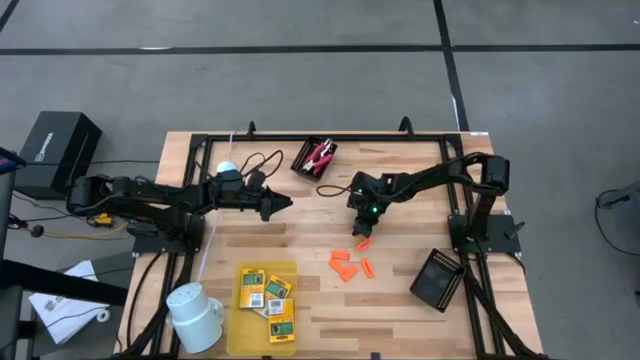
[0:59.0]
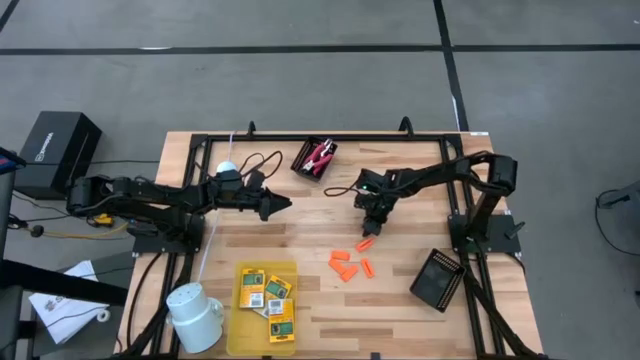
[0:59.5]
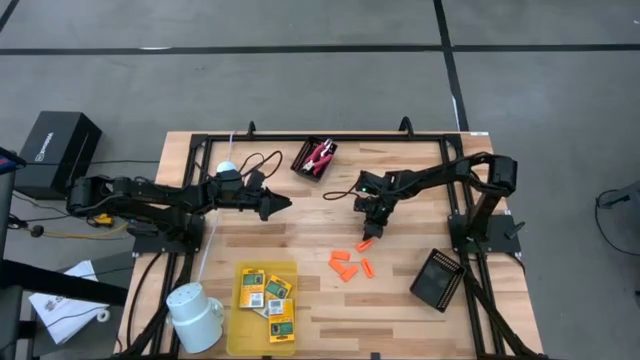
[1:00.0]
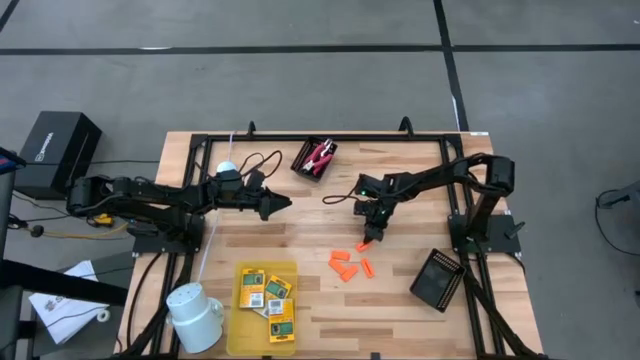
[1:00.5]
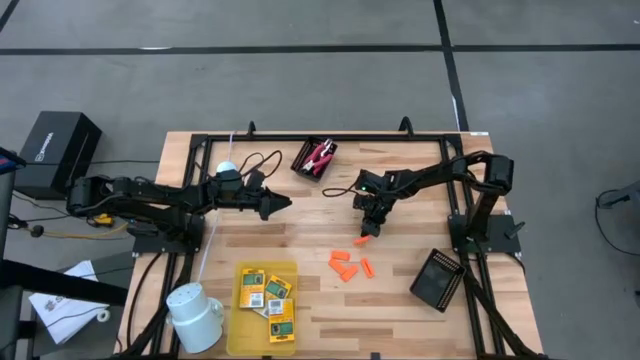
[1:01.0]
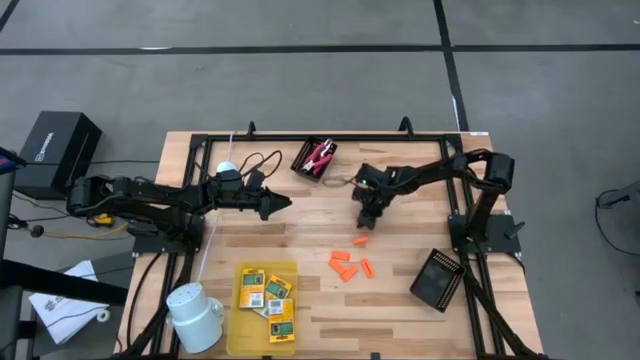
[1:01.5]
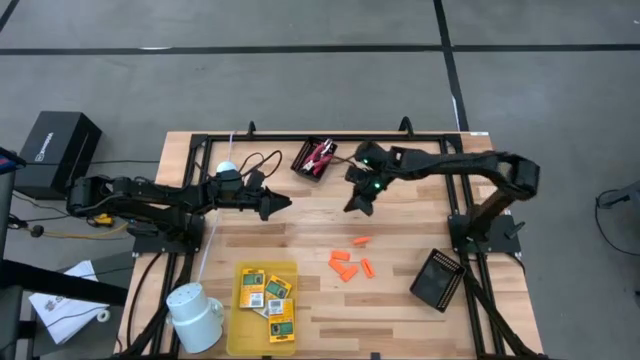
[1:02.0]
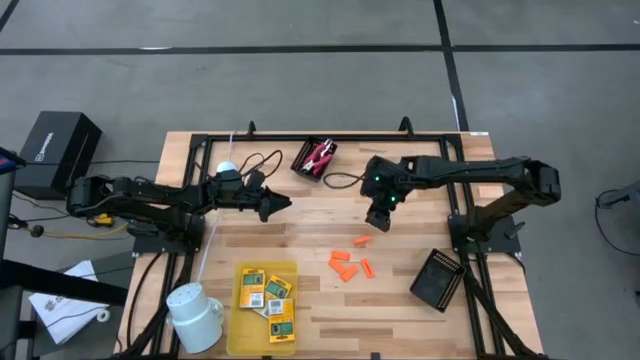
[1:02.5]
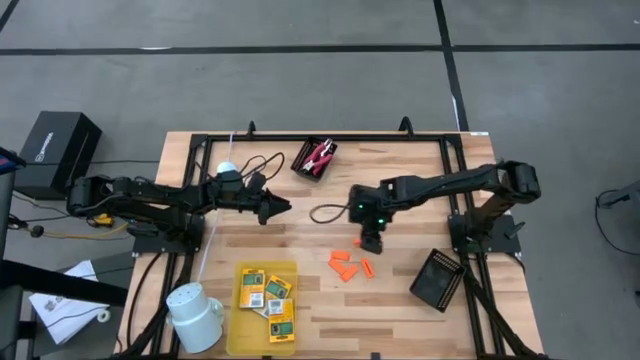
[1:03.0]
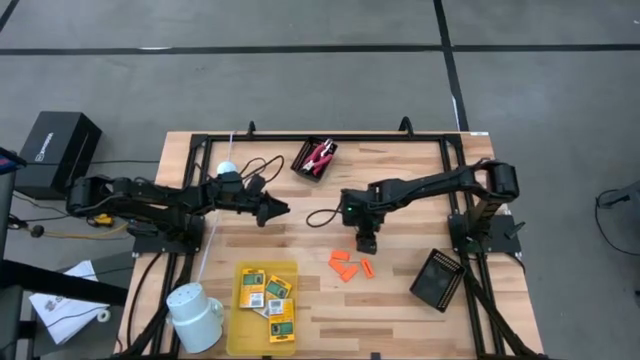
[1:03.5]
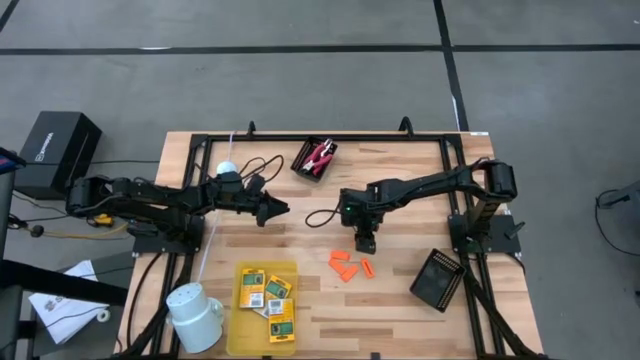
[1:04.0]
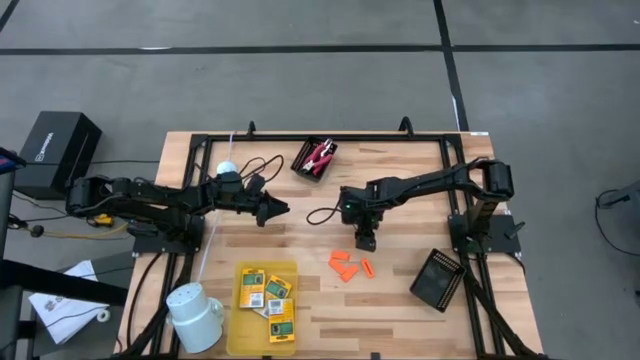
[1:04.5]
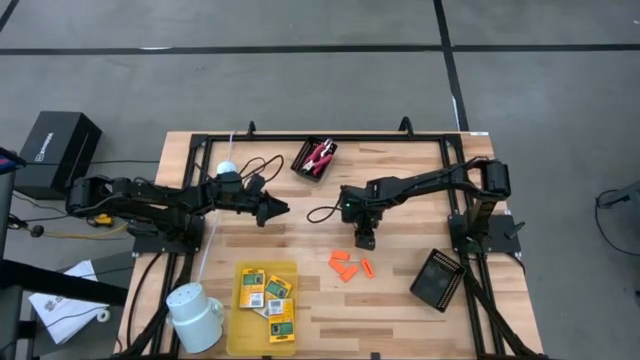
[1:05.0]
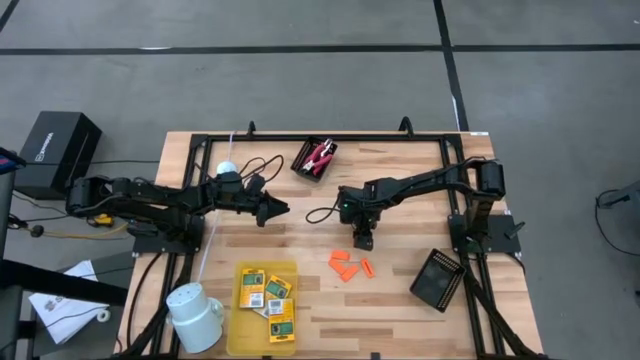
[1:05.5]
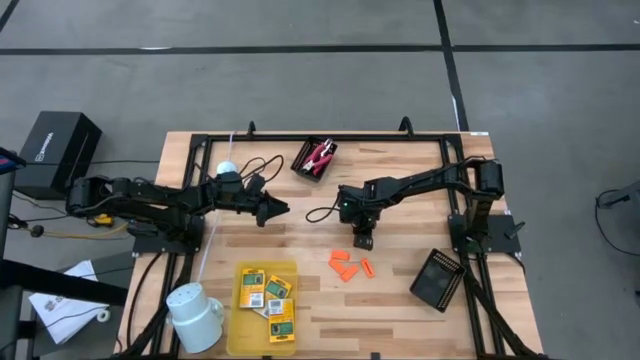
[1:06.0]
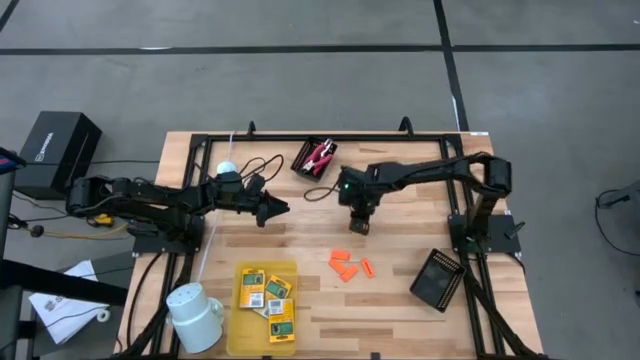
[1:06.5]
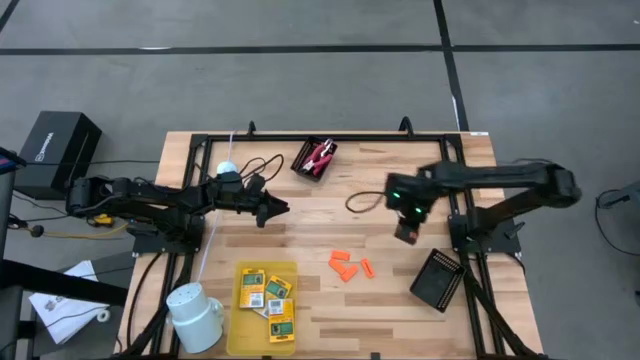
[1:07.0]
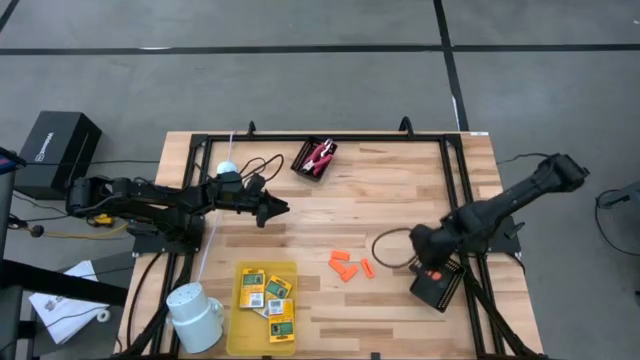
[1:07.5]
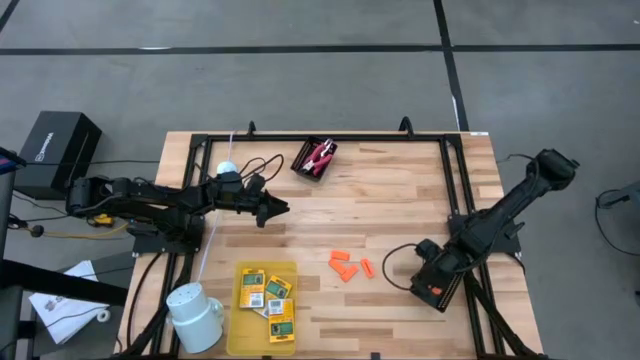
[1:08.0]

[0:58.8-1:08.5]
Task: Pick & Place School Supplies
Put the orange eraser into the bottom black bin

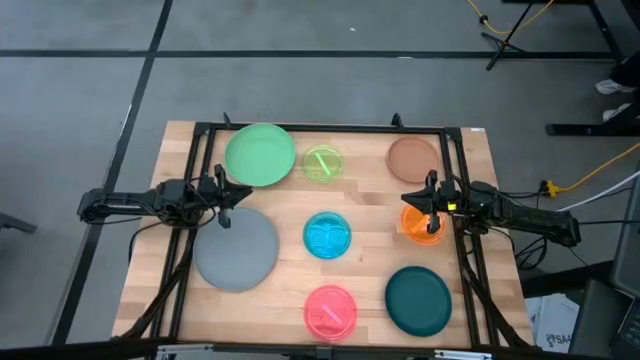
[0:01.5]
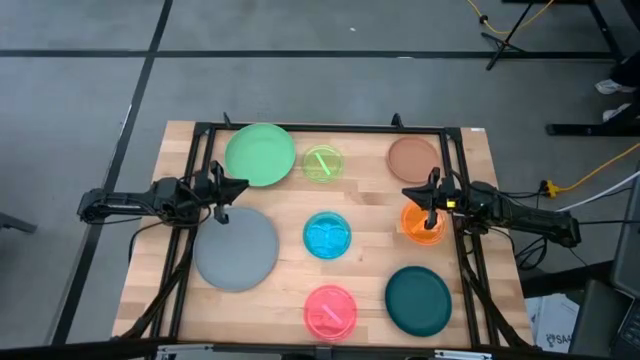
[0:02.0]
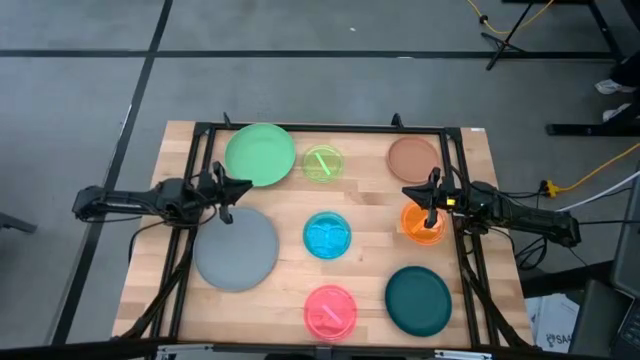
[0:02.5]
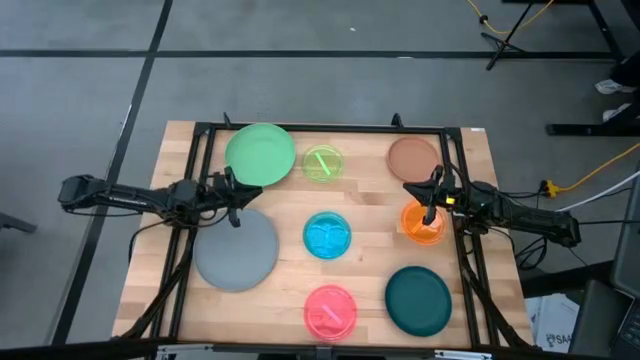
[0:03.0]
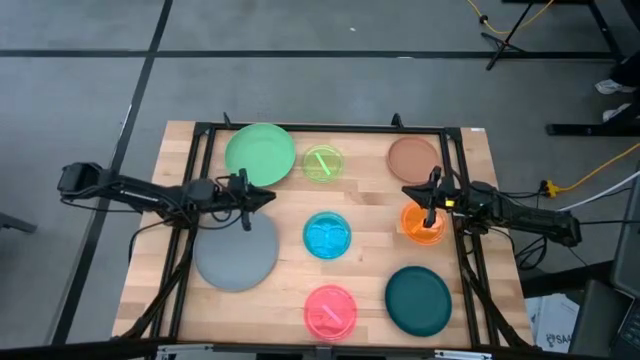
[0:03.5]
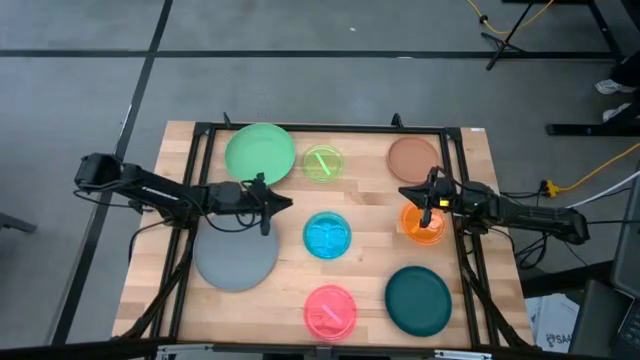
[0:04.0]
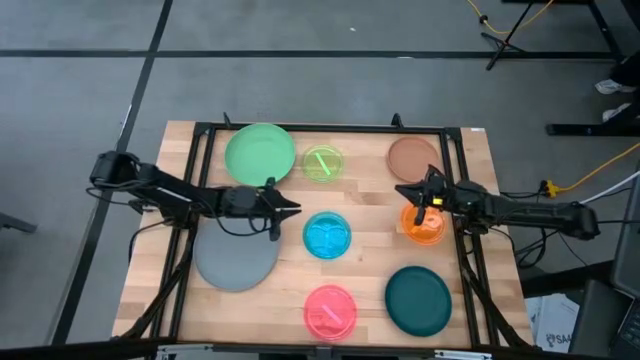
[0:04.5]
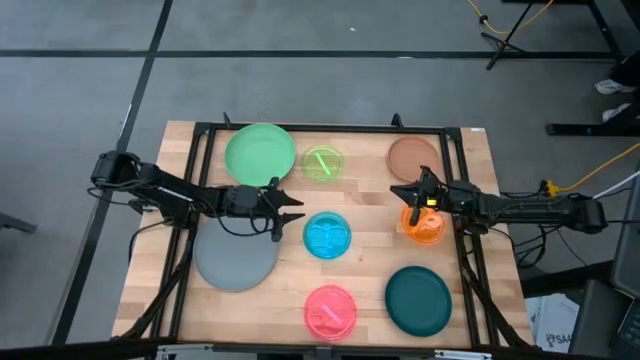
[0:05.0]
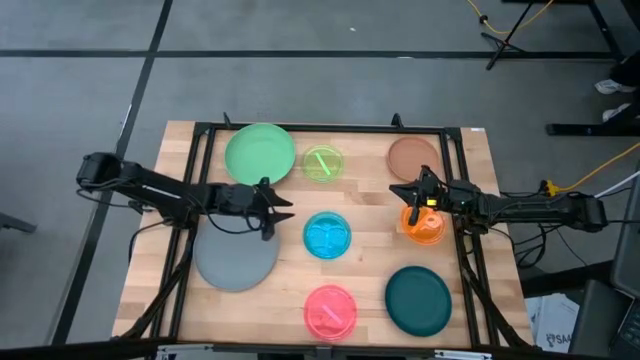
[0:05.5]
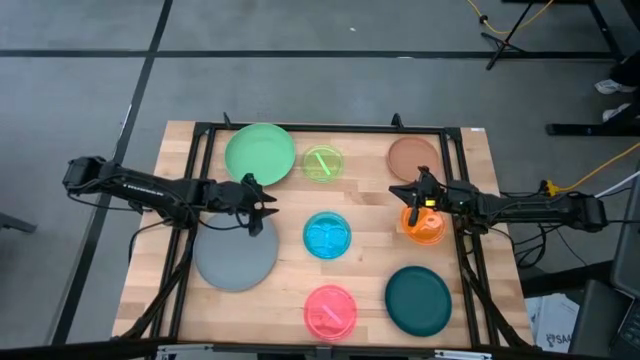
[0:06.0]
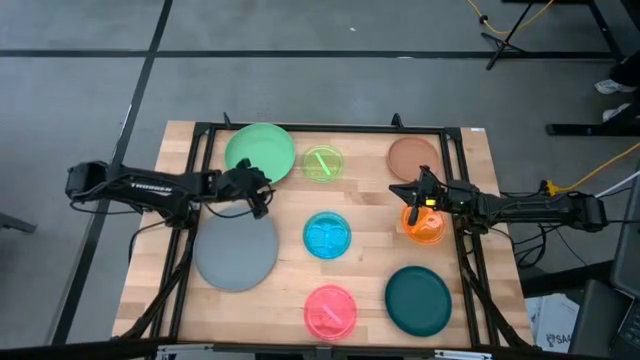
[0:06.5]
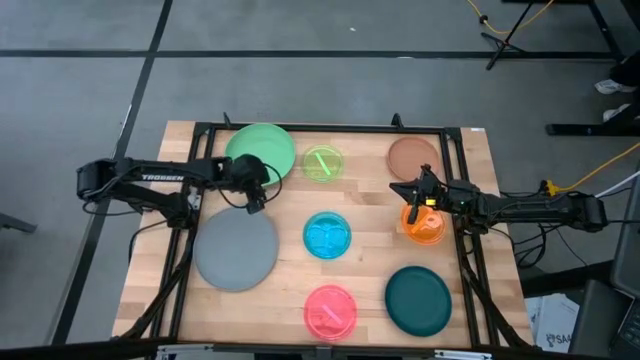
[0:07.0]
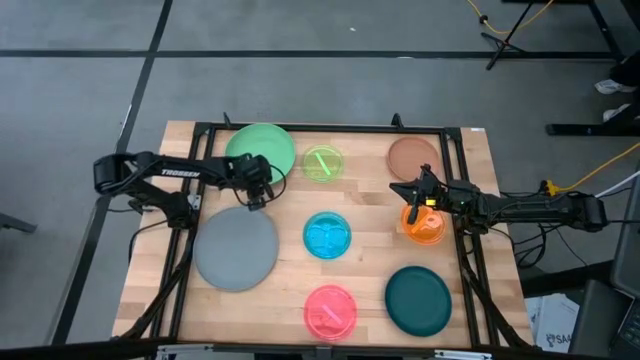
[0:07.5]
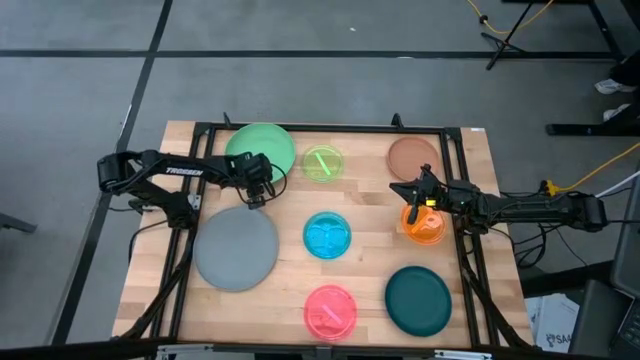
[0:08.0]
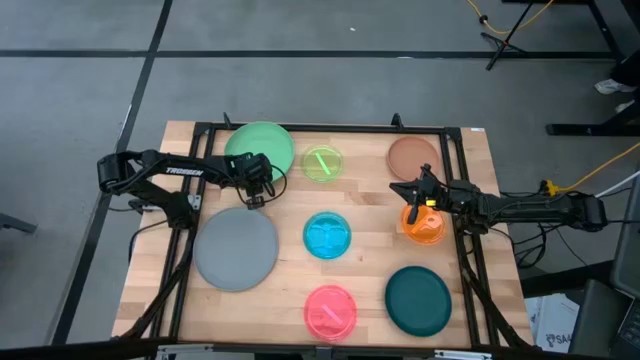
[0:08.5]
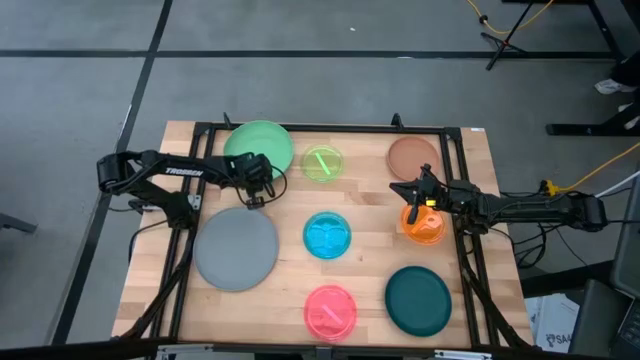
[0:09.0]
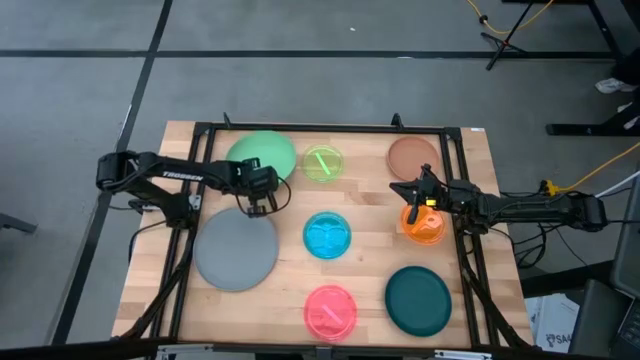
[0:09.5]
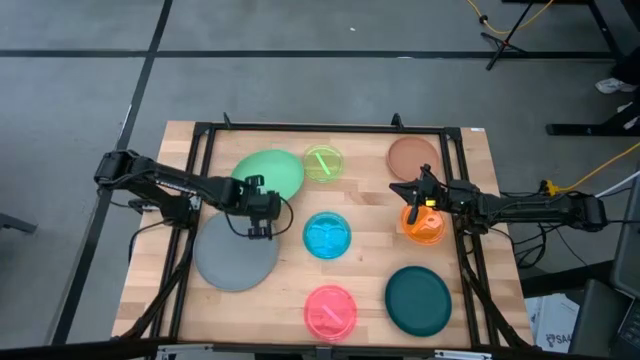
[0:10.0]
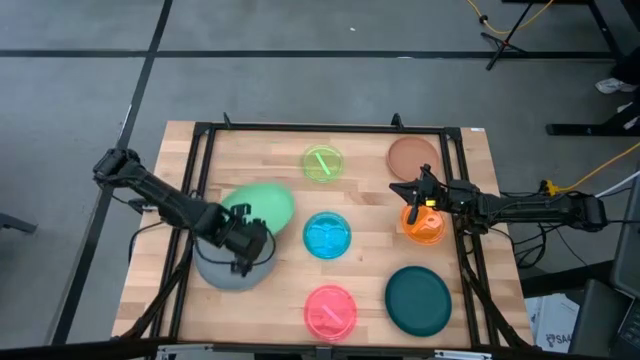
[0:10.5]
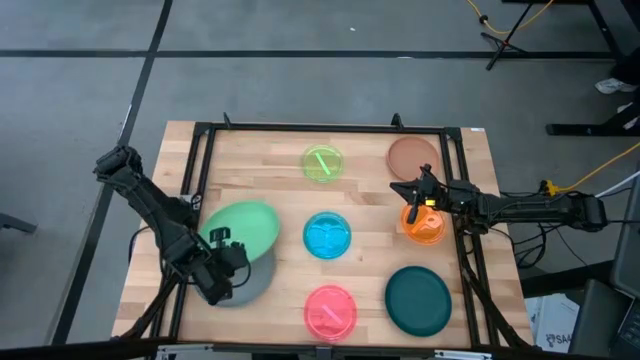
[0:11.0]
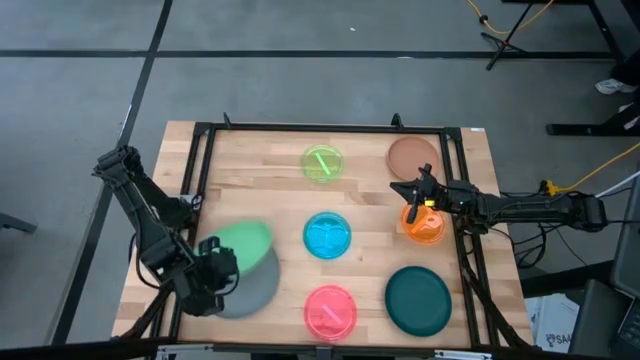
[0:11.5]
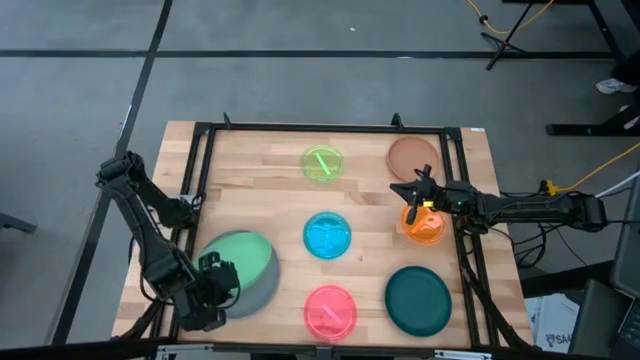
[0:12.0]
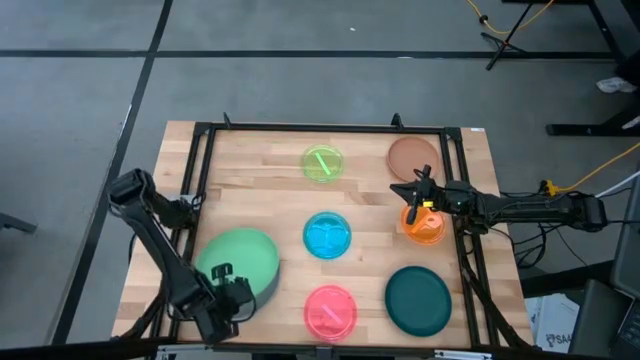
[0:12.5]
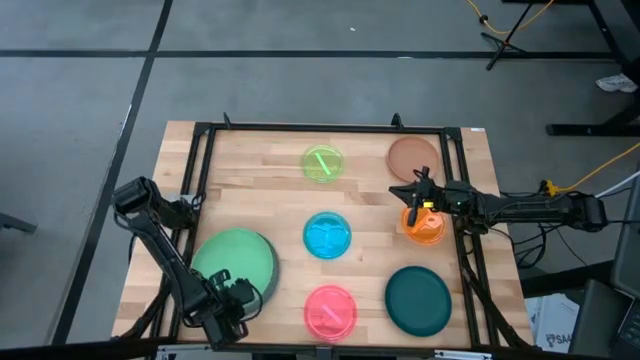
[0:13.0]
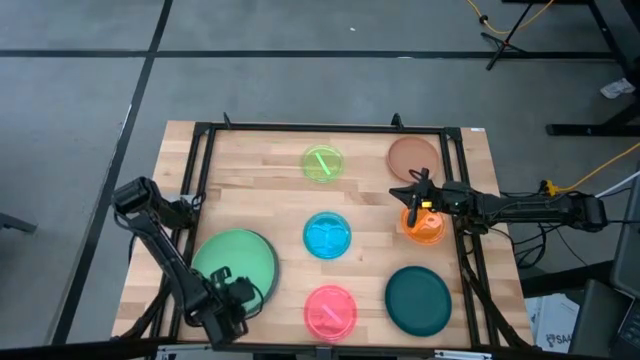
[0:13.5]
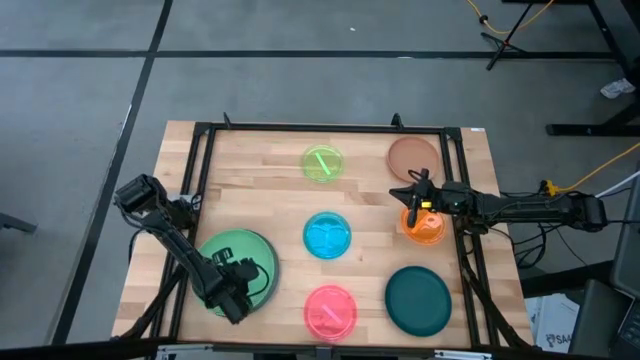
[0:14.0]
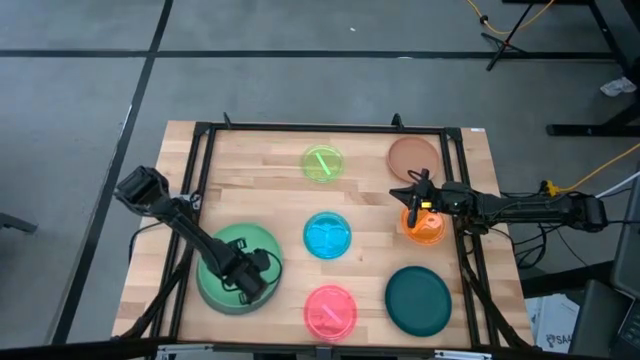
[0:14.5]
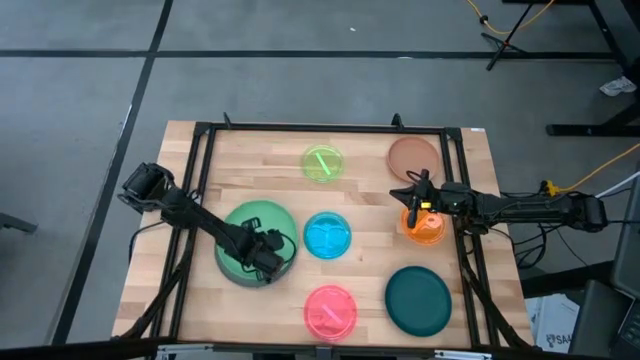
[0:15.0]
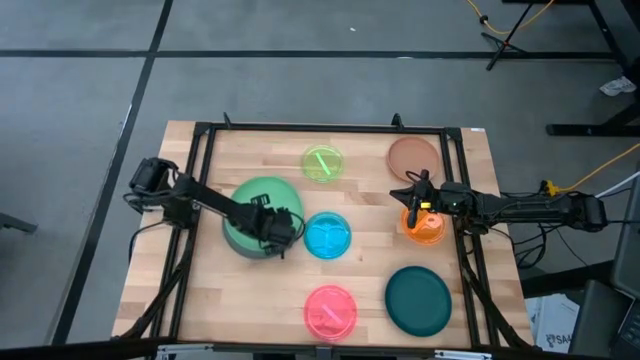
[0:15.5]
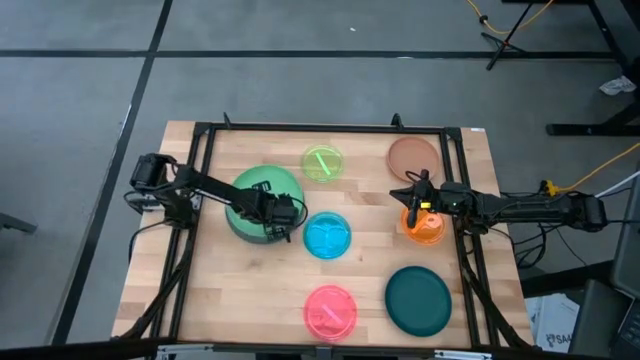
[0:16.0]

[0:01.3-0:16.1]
Task: Stack plastic plates
Stack the green plate on top of gray plate
